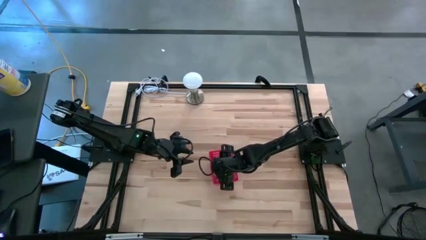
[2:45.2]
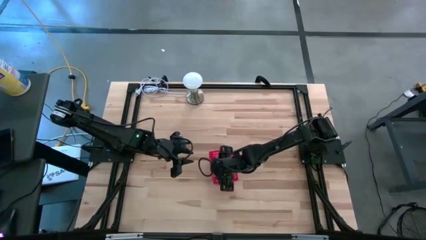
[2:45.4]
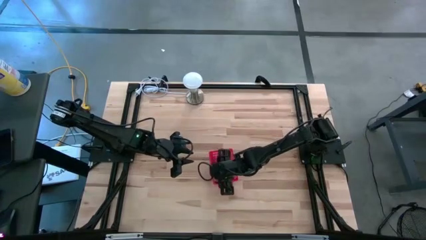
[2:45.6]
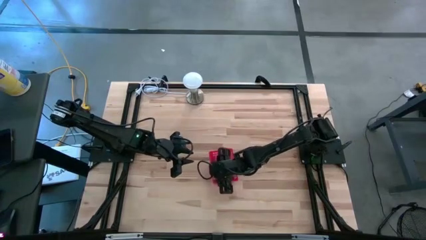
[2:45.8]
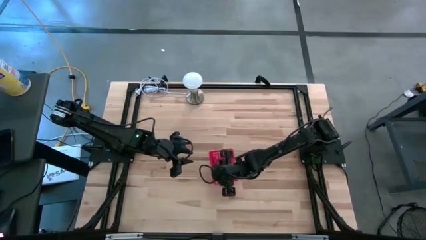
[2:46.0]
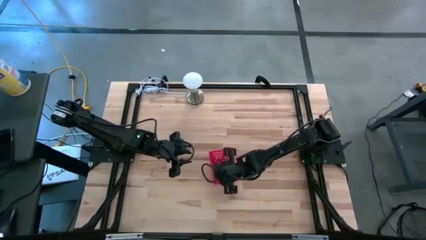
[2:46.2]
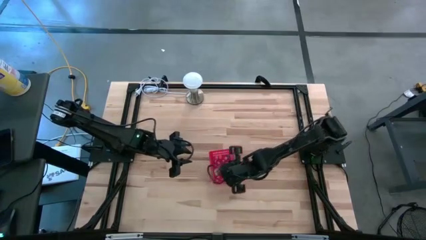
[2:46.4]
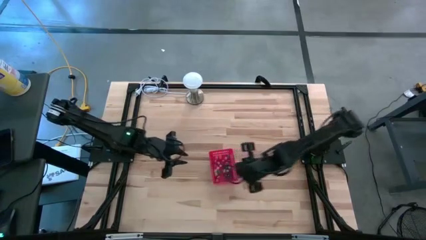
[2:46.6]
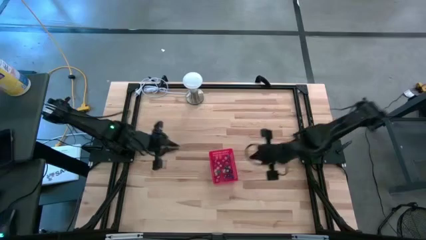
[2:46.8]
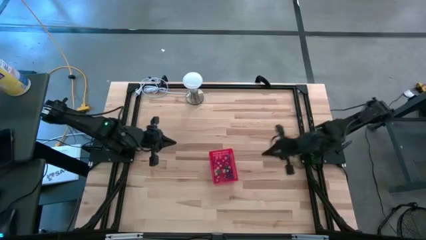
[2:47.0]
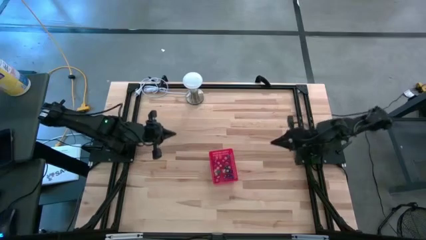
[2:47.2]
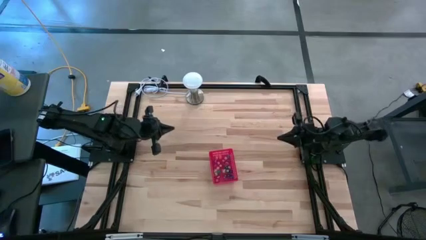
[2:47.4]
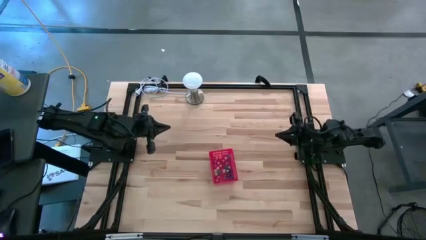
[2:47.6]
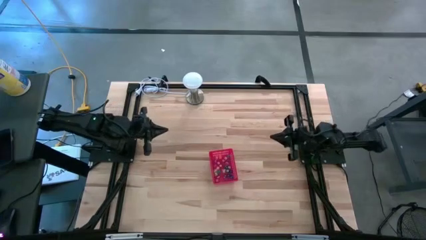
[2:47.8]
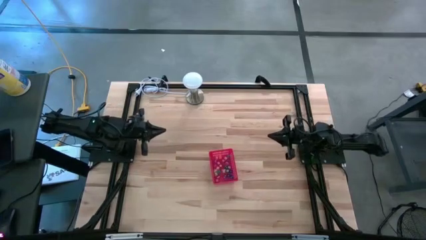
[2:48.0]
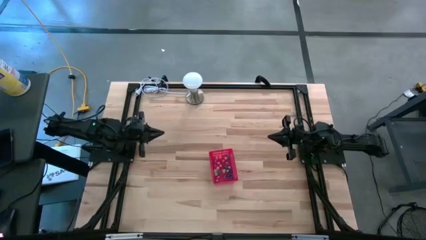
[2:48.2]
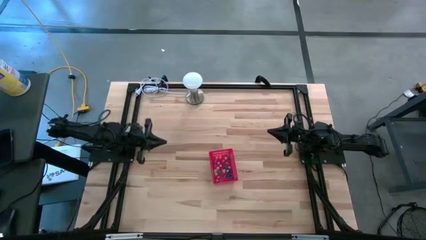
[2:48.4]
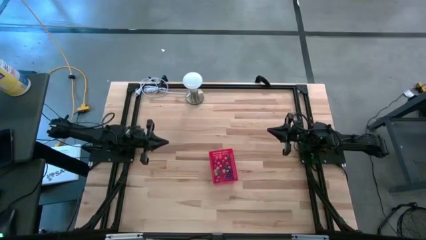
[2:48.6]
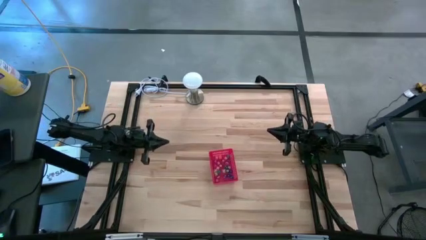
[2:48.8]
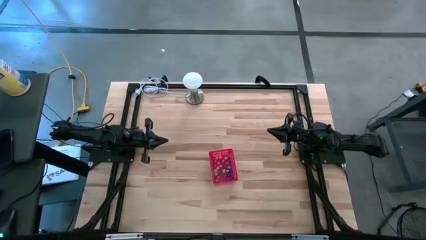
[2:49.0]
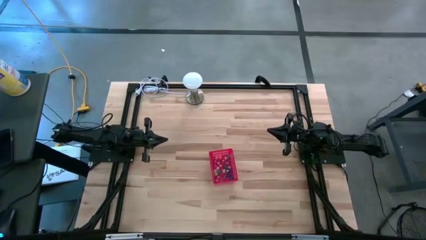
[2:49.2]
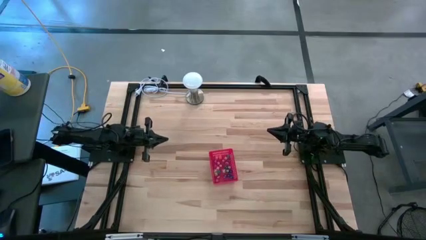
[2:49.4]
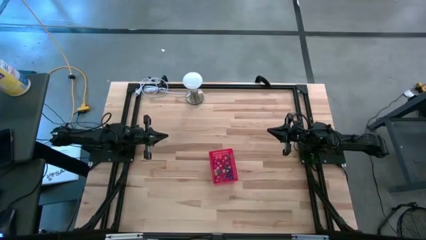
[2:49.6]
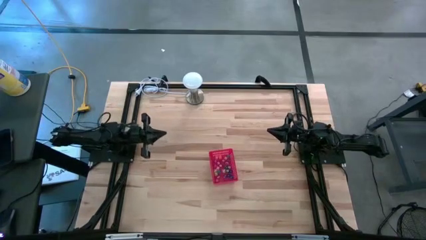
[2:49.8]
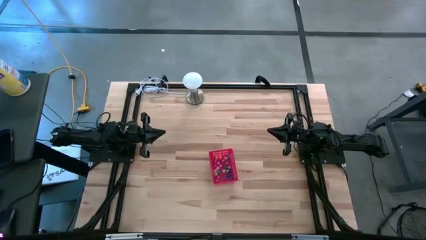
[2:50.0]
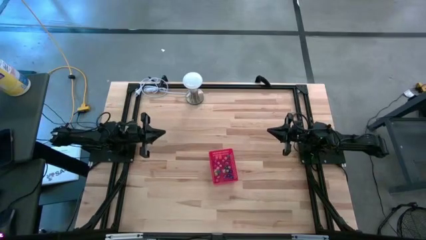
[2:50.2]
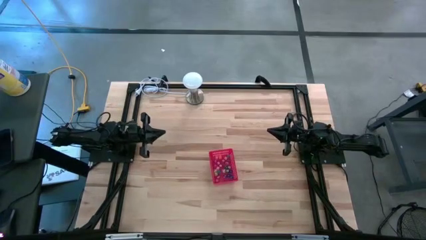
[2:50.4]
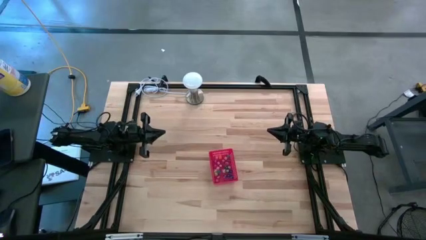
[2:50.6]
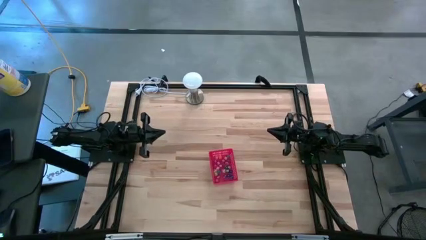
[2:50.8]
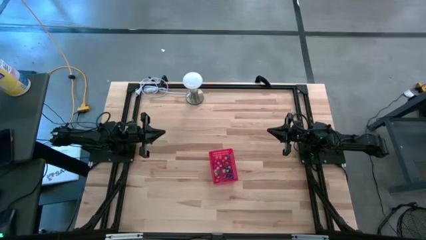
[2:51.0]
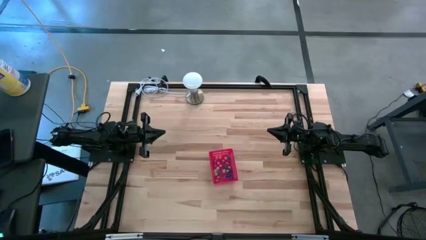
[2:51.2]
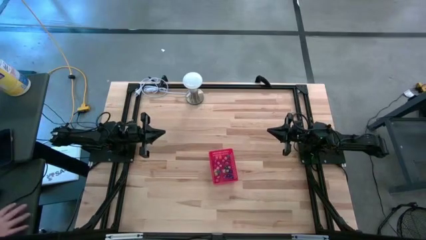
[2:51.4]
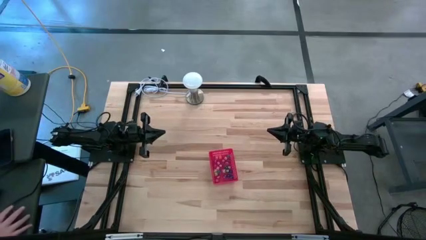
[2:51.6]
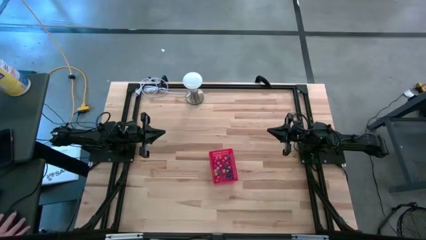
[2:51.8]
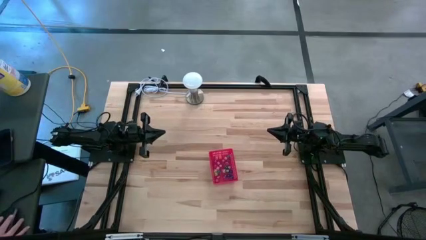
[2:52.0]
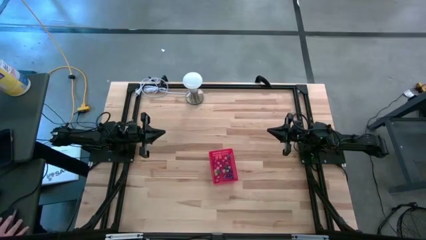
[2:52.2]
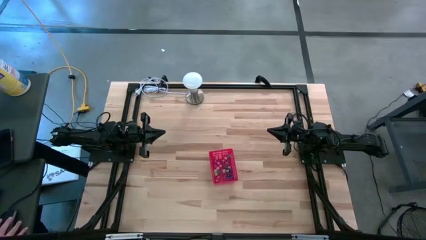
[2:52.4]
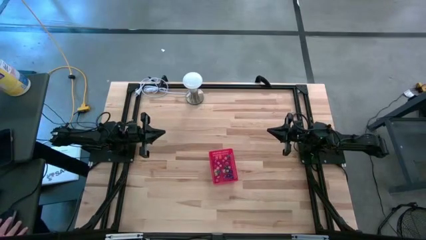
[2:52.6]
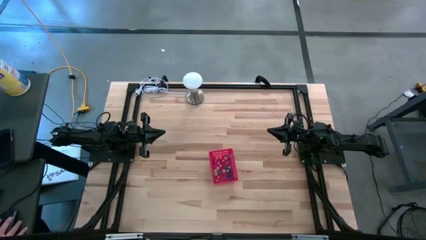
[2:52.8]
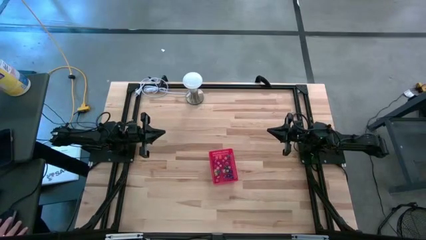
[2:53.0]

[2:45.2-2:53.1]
Task: Pick & Place Dice
Return to Home Position

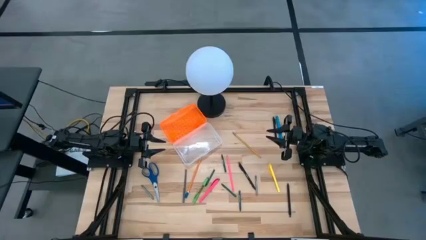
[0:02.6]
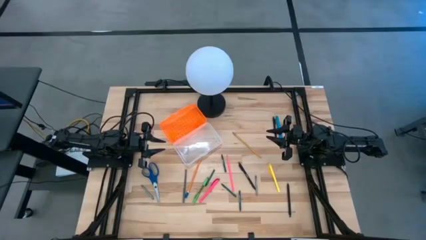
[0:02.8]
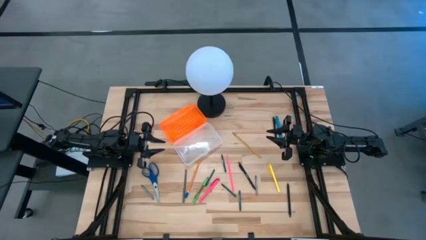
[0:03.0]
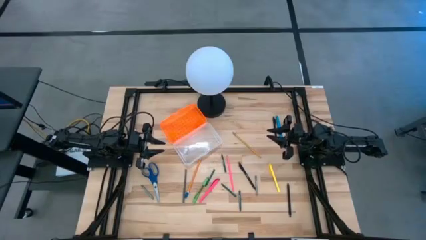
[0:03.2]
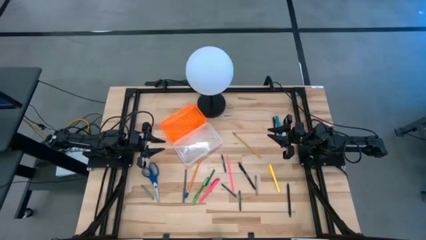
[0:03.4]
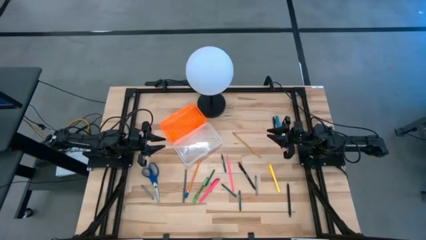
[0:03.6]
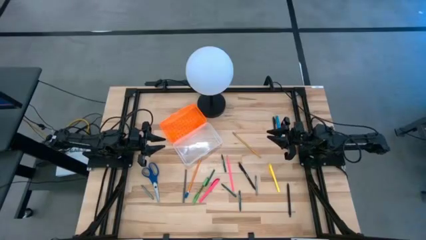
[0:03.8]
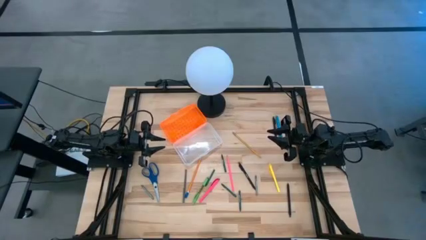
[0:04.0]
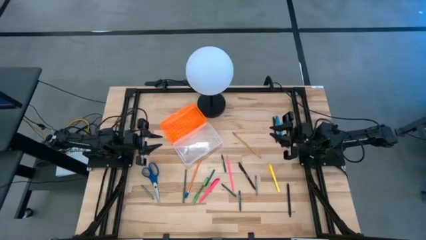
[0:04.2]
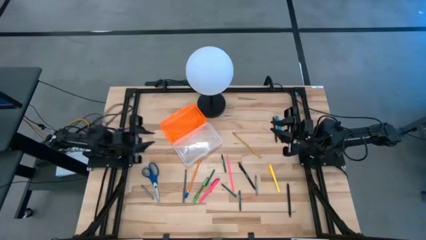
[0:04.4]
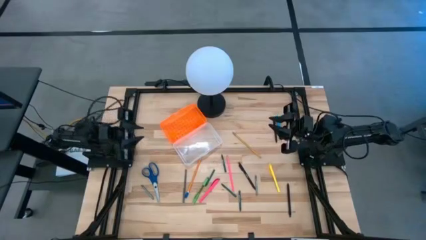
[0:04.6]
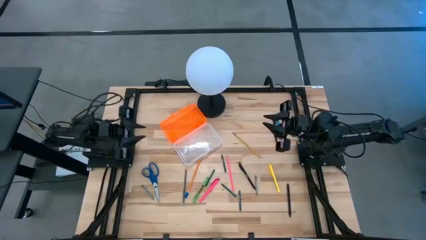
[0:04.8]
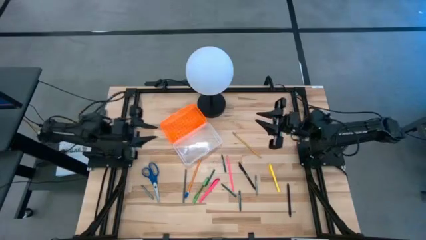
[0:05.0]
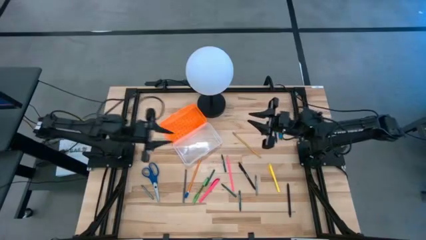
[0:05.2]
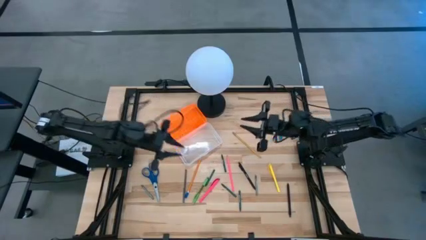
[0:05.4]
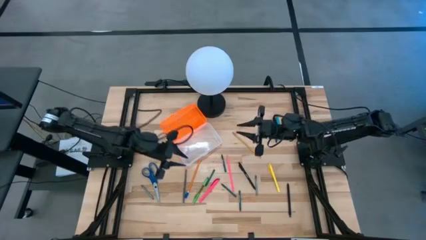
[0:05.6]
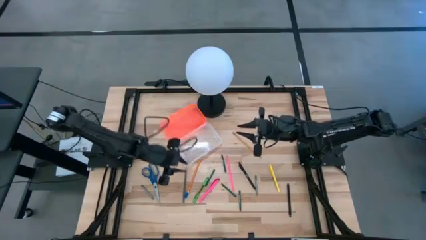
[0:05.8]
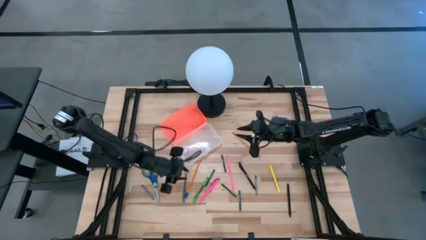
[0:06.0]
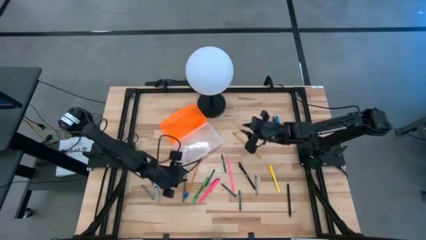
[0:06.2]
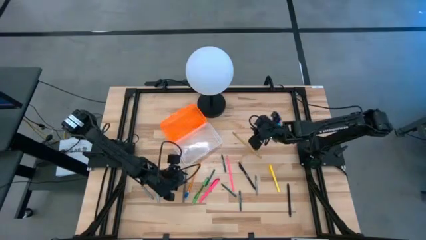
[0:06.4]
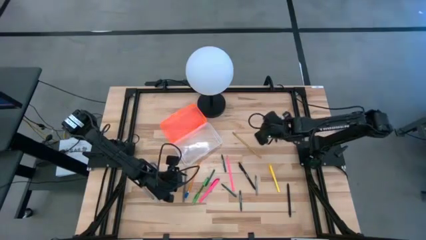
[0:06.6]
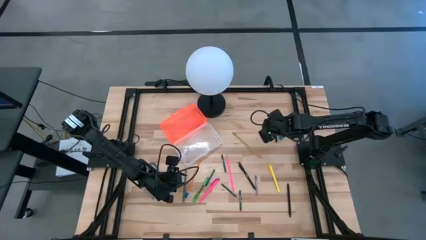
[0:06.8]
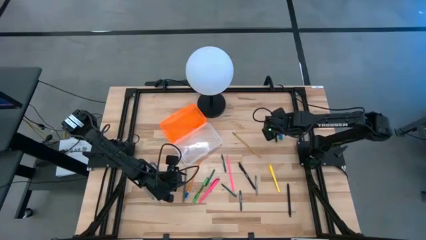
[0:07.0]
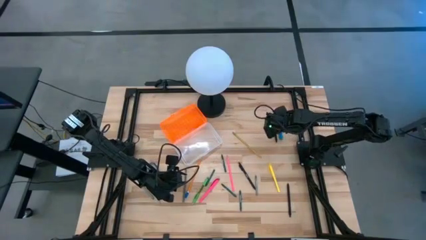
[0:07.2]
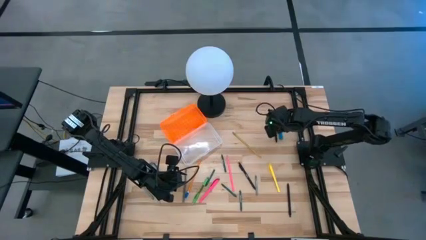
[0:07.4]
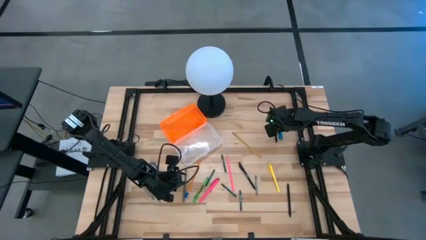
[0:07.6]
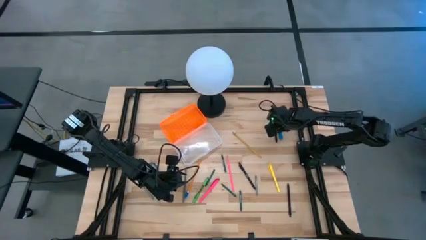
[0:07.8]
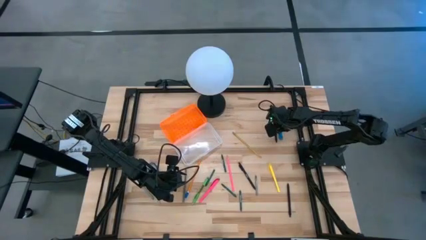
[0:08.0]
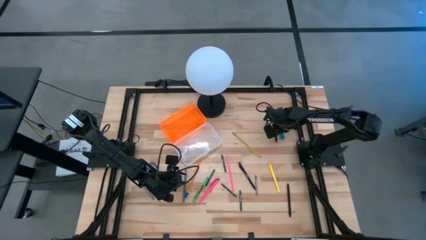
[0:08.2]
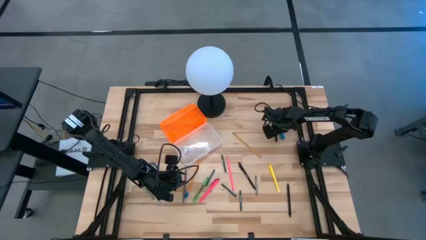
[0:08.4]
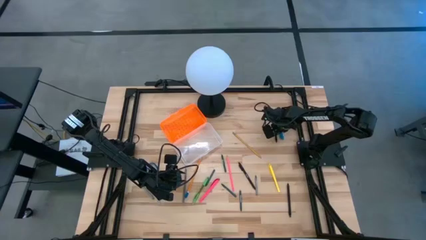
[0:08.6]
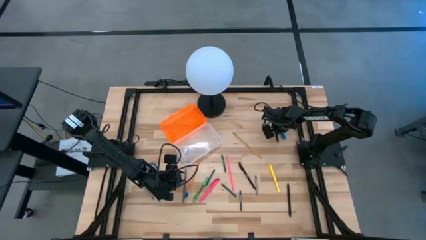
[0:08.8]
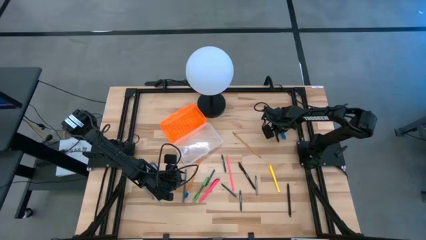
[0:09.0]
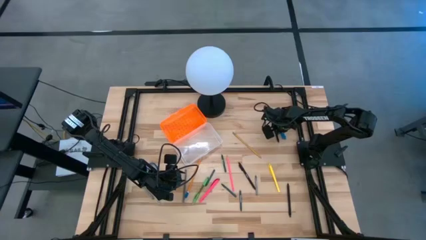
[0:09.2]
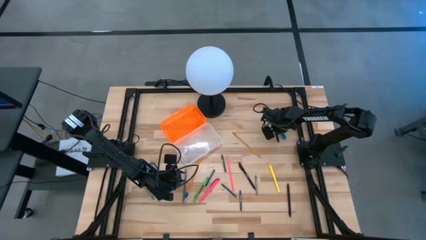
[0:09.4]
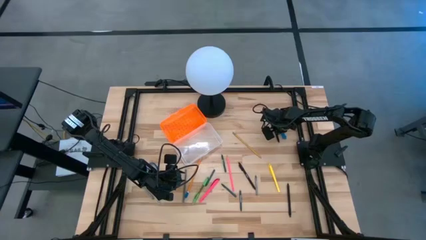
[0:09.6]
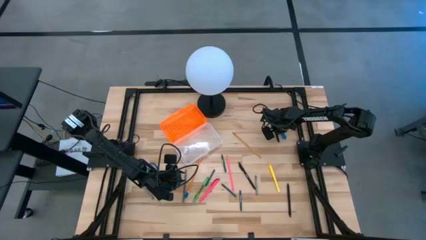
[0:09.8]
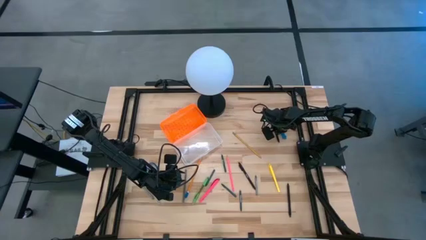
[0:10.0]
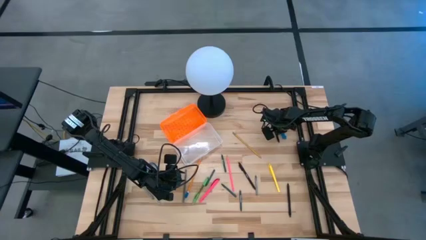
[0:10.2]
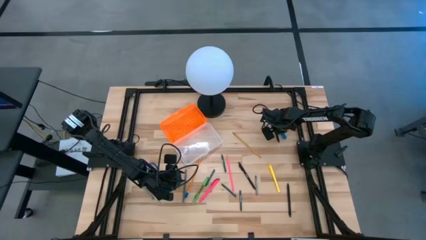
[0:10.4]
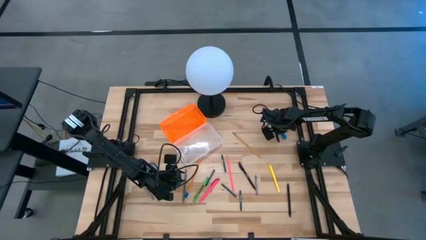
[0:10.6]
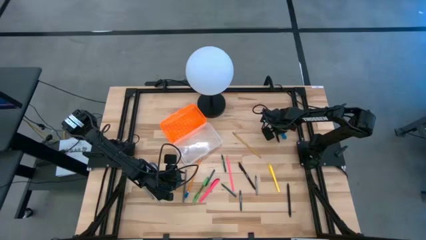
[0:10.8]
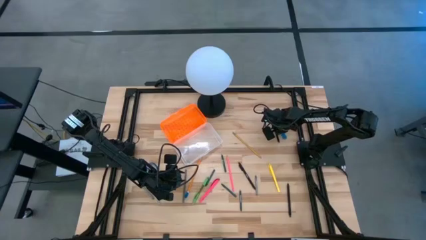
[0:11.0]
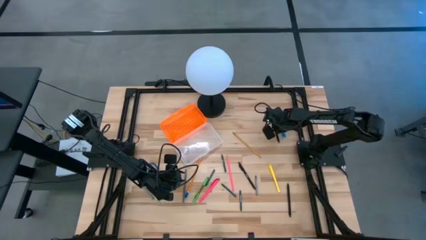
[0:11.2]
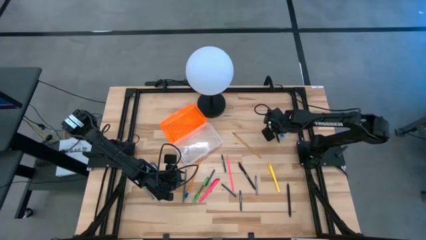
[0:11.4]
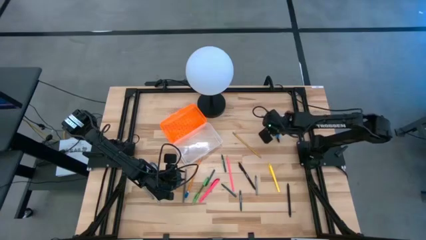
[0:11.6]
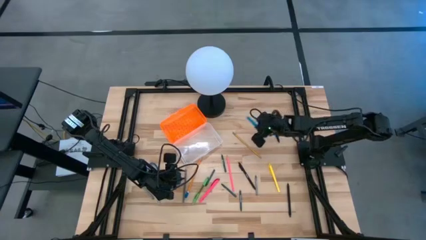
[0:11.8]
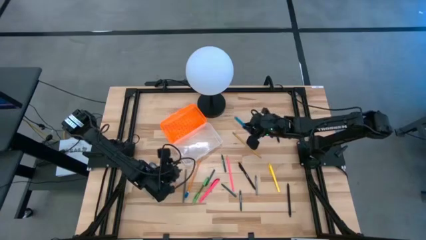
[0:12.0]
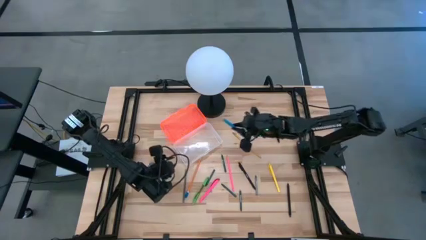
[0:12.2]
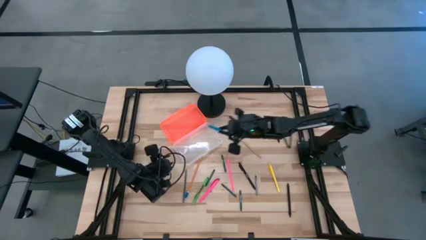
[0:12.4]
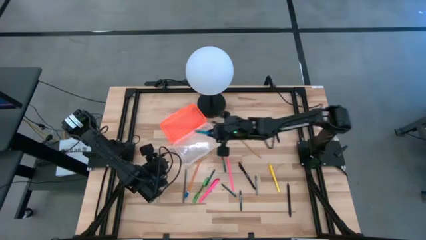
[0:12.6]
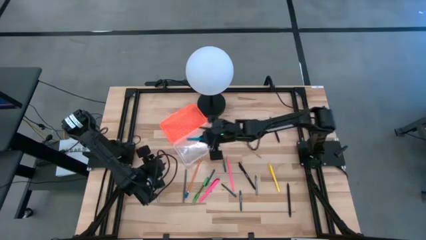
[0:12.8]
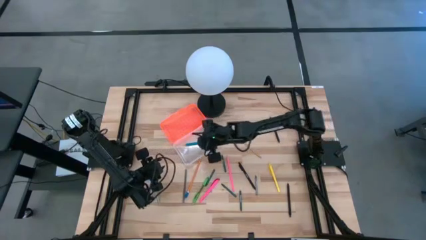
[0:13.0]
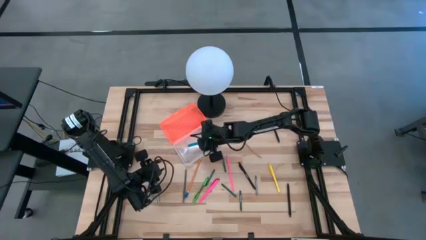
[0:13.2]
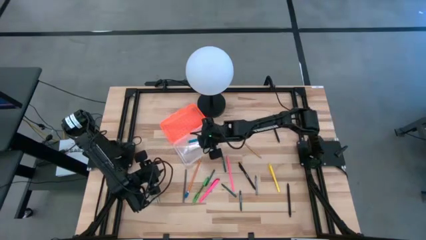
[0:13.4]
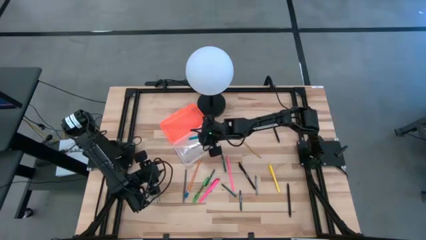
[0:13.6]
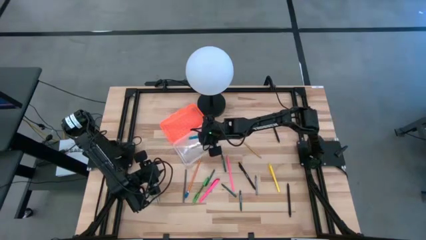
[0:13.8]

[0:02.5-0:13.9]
Task: Pick & place school supplies into a supply box
Put the blue pen into the orange supply box
